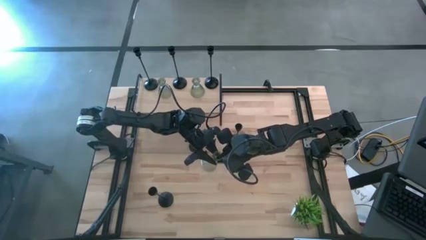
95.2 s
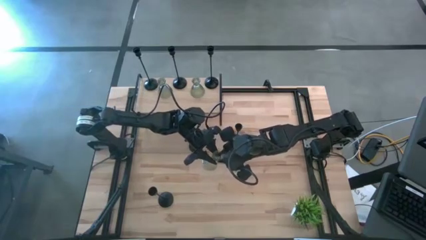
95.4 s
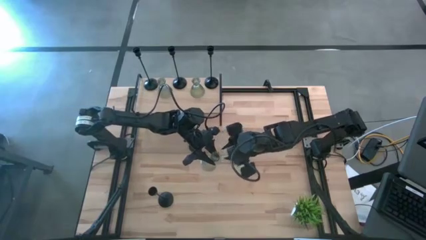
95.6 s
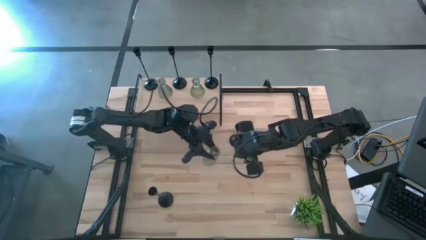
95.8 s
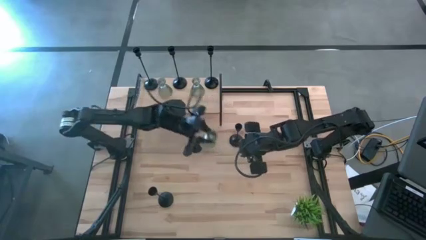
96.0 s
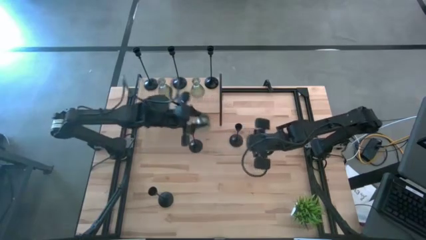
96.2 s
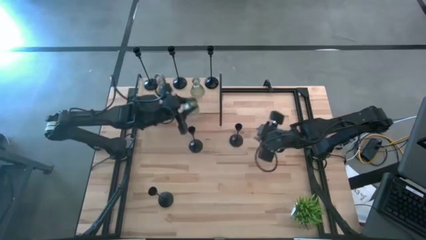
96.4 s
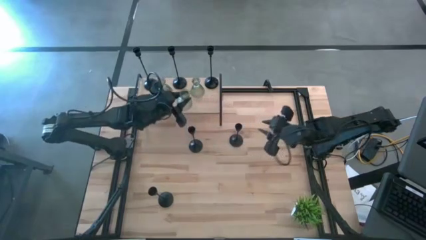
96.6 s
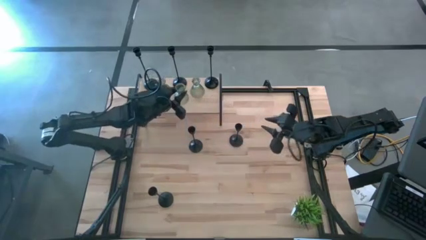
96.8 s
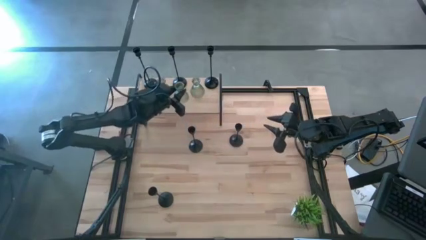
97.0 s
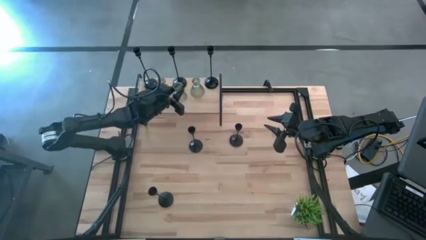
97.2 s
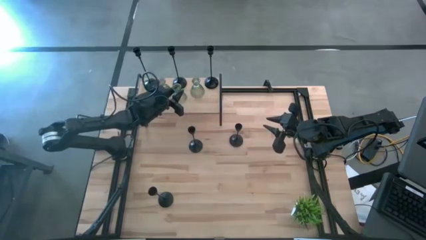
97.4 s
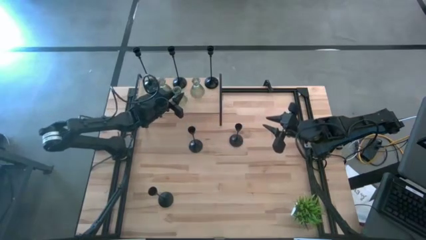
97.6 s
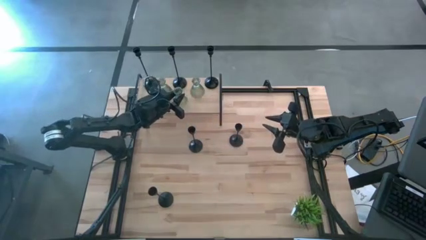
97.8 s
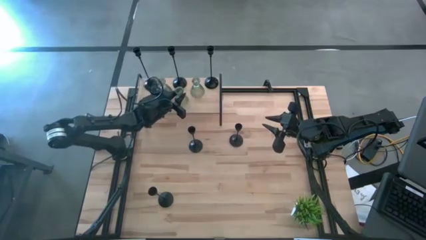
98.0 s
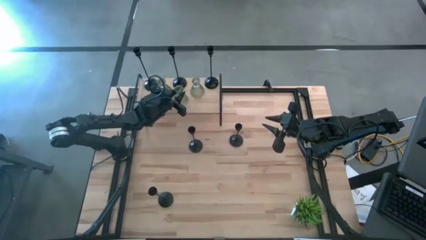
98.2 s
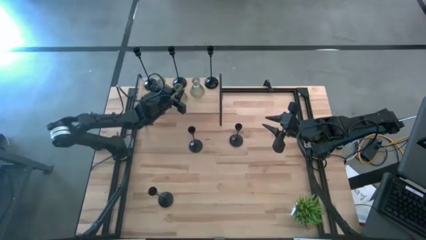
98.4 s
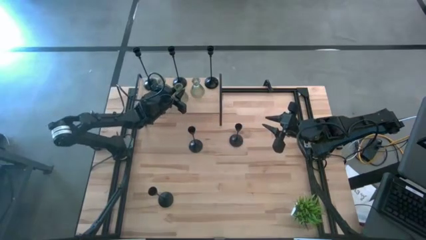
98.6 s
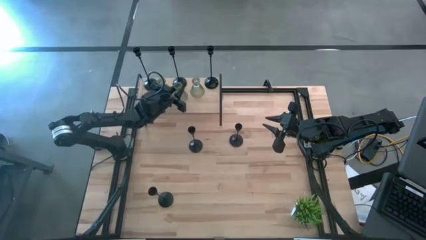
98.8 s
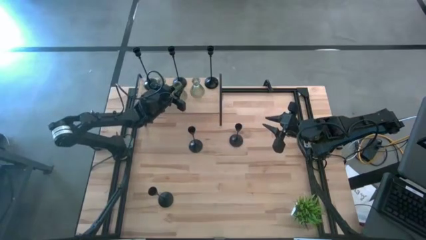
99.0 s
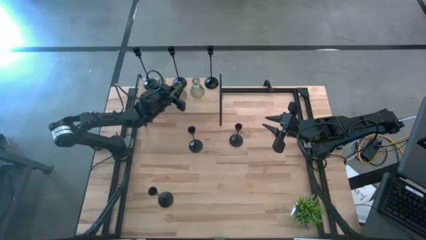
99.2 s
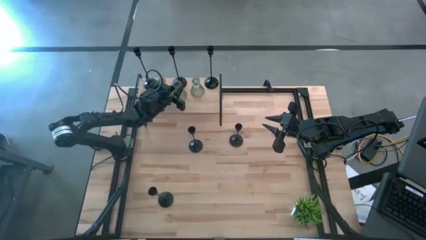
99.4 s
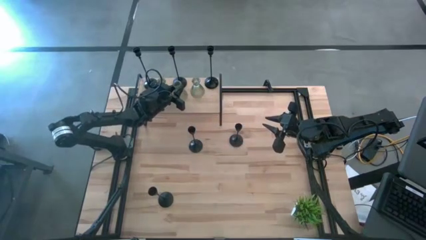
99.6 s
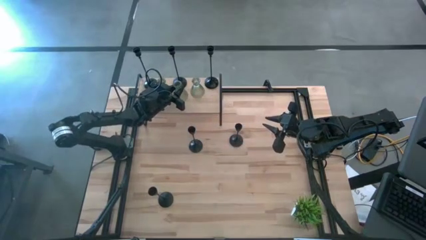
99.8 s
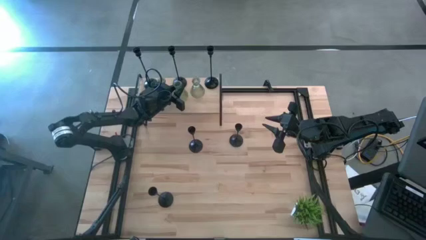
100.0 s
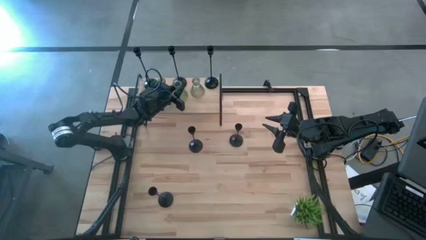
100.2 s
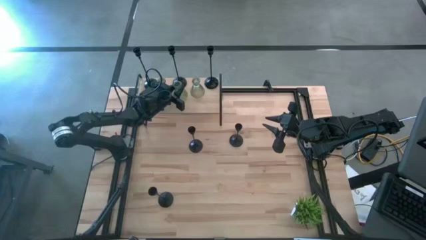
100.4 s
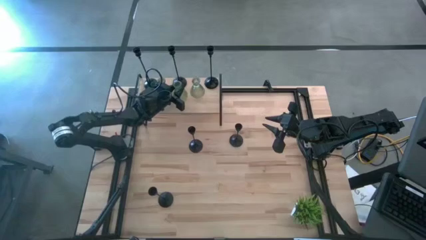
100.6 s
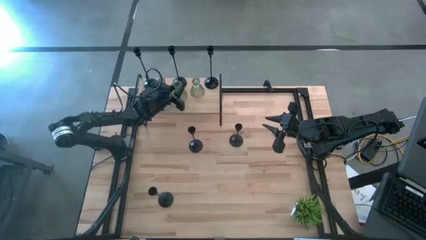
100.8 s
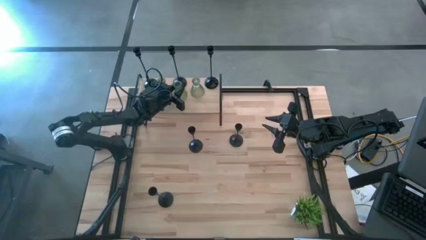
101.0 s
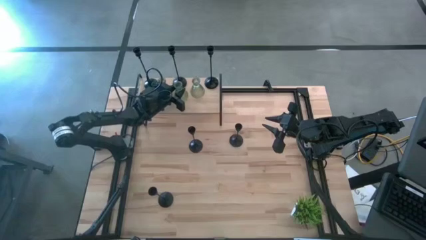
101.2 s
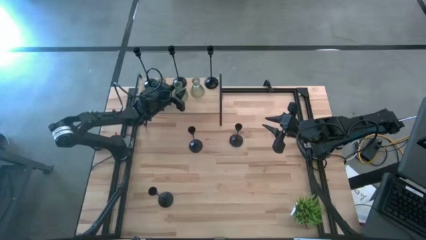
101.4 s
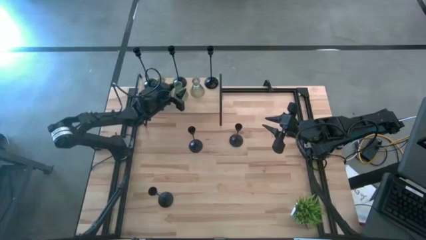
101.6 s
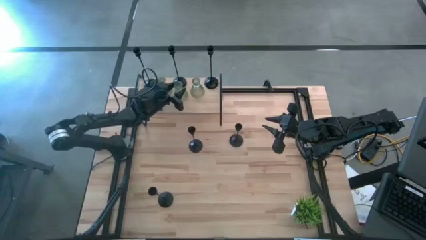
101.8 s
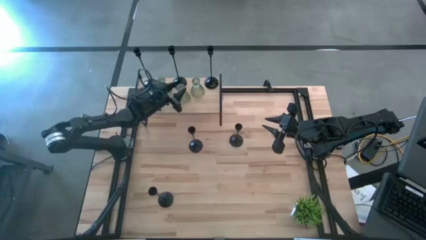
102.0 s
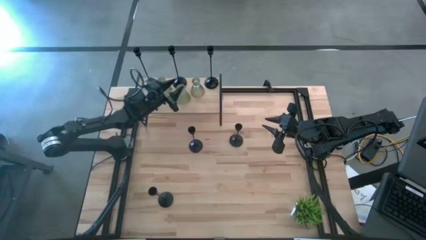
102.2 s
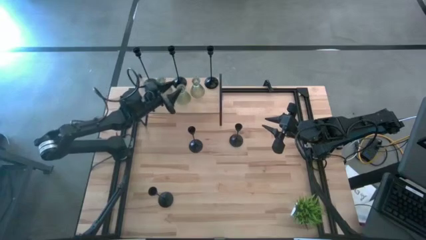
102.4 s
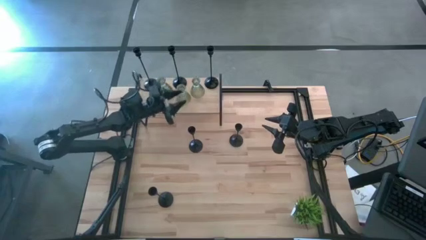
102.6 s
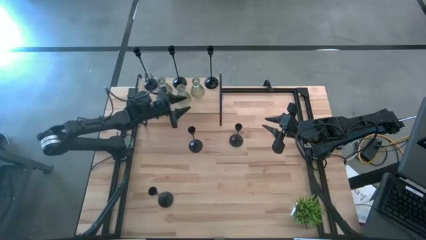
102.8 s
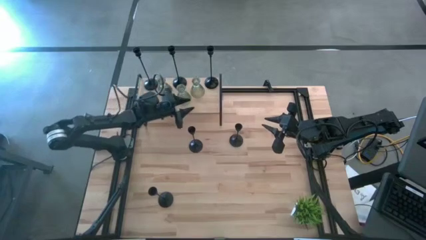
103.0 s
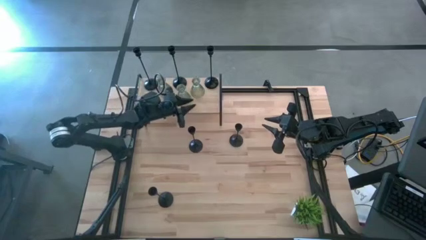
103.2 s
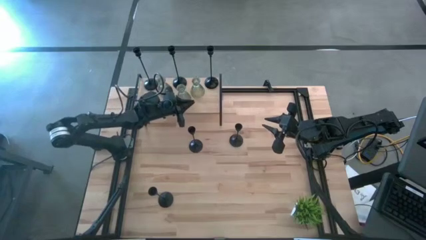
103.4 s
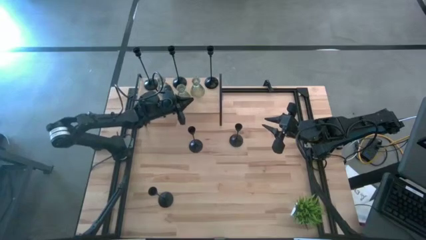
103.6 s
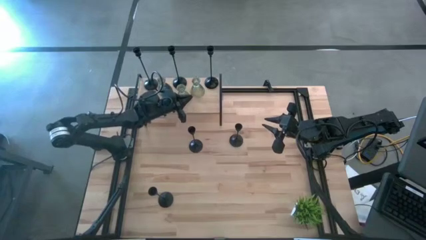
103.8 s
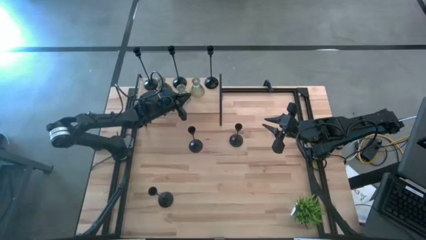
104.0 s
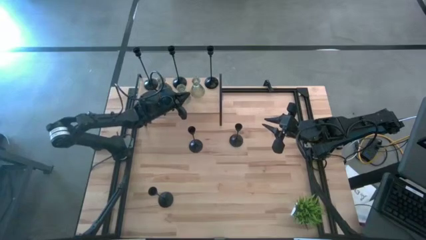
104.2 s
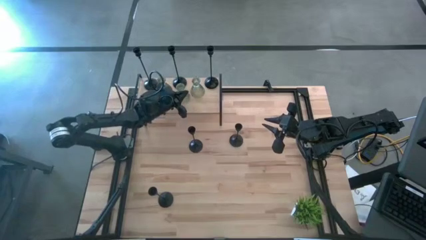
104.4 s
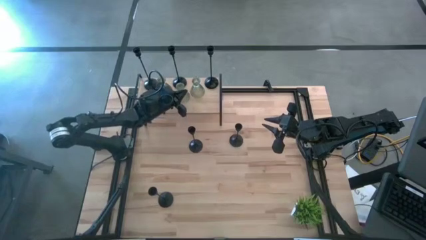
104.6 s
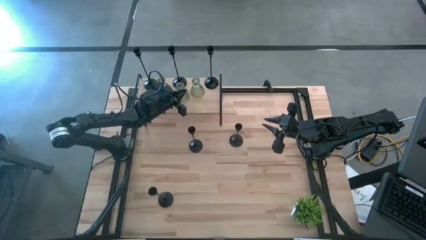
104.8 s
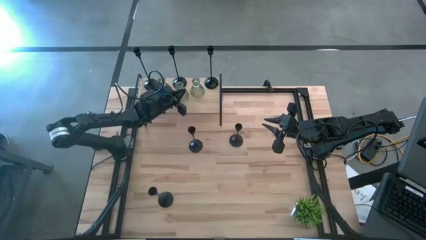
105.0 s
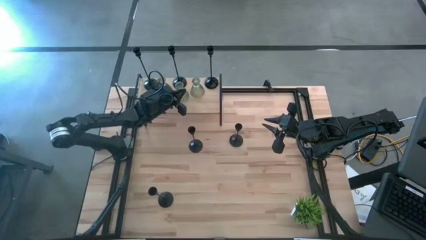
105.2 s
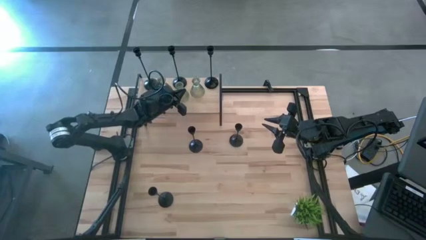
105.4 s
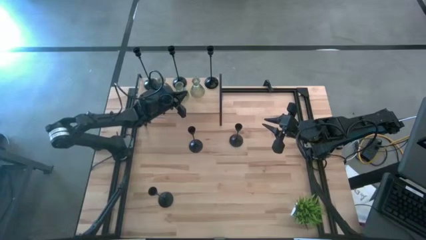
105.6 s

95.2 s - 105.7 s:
Task: Pick & Place candle stick holders
Put the green glass candle holder on the shelf

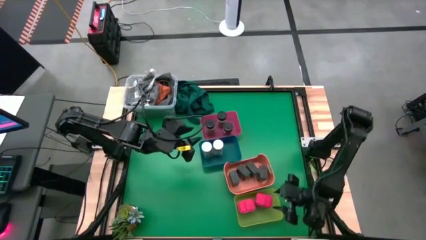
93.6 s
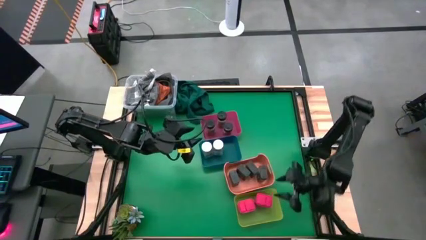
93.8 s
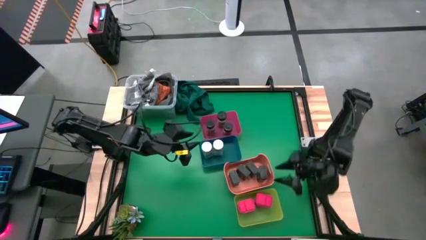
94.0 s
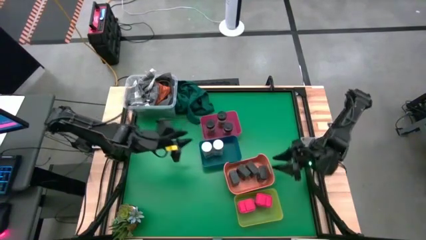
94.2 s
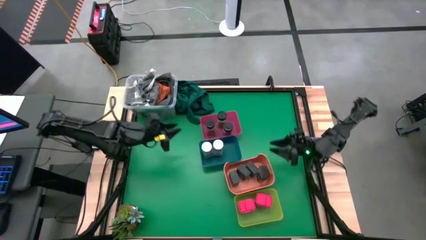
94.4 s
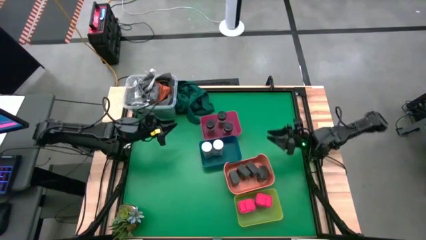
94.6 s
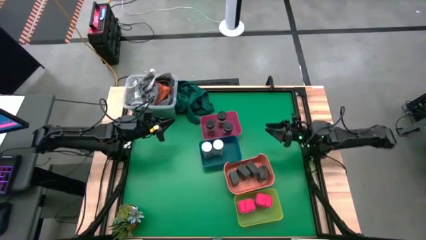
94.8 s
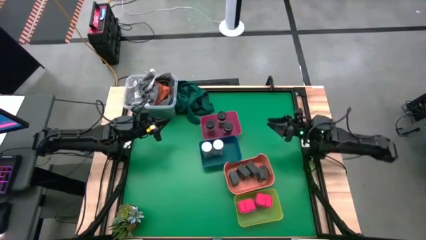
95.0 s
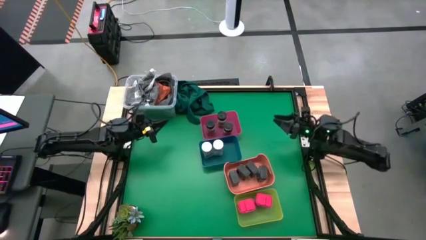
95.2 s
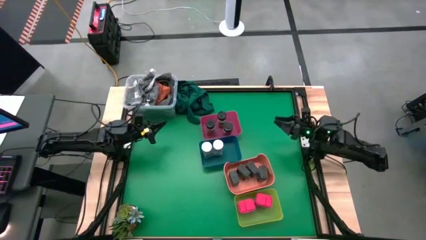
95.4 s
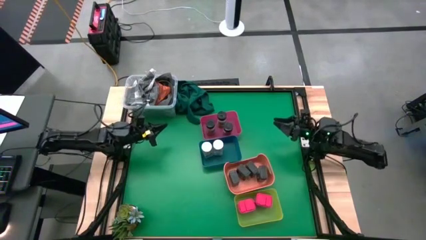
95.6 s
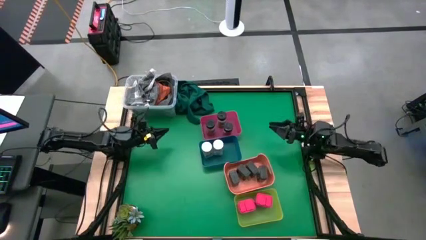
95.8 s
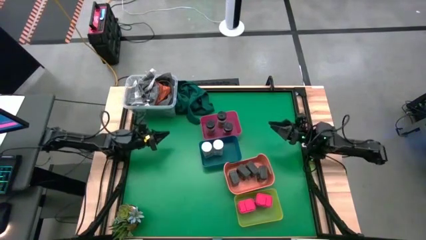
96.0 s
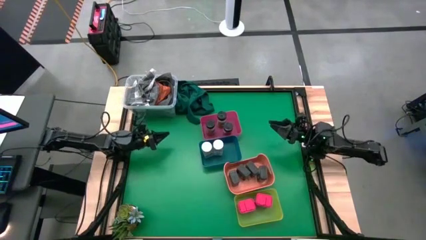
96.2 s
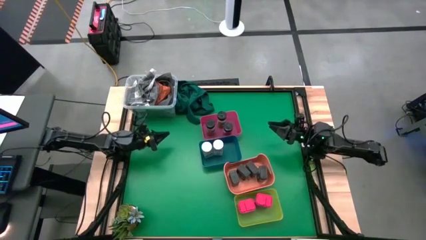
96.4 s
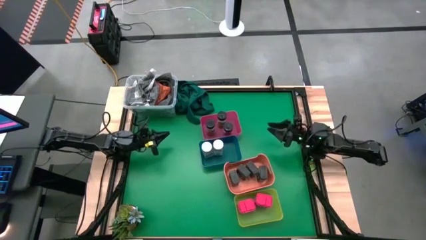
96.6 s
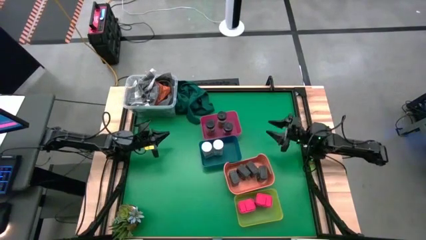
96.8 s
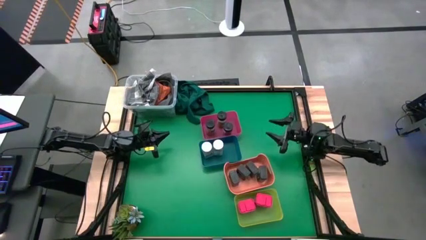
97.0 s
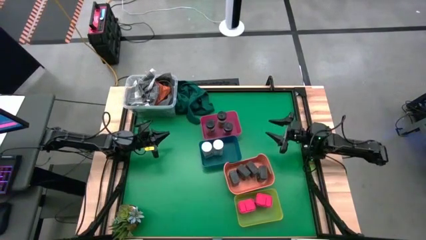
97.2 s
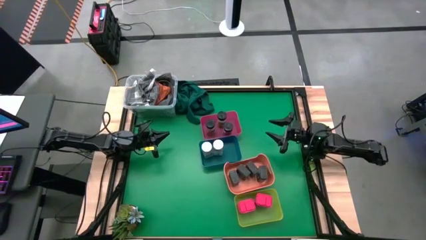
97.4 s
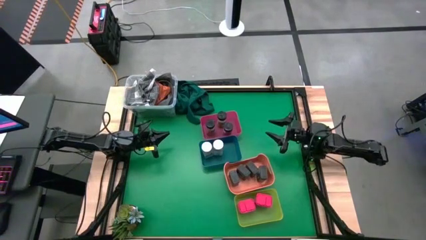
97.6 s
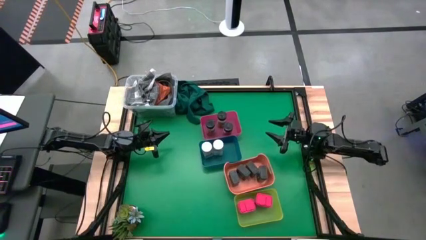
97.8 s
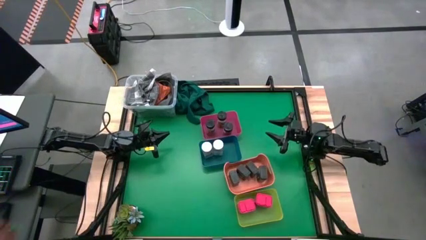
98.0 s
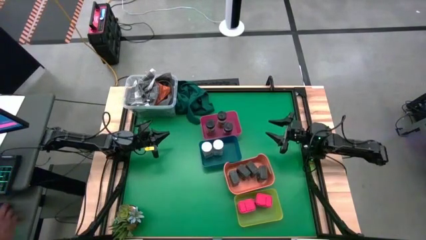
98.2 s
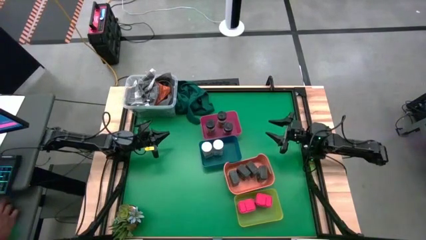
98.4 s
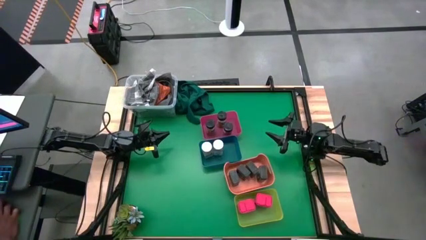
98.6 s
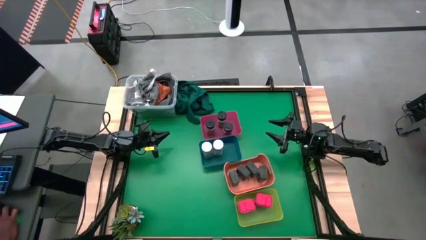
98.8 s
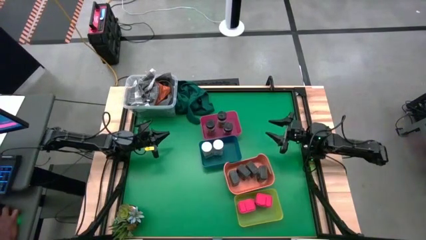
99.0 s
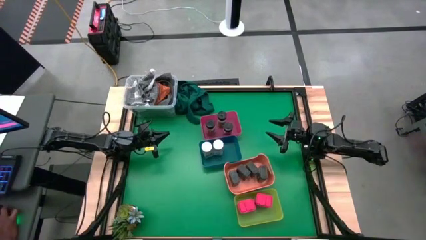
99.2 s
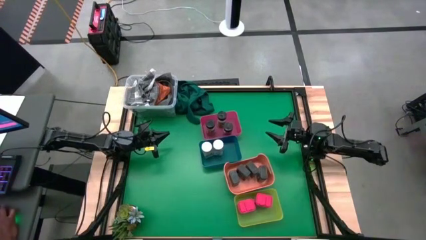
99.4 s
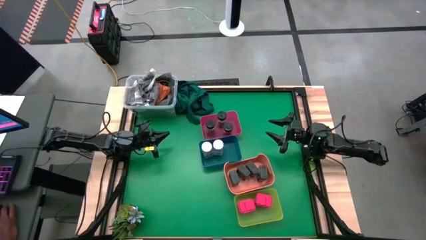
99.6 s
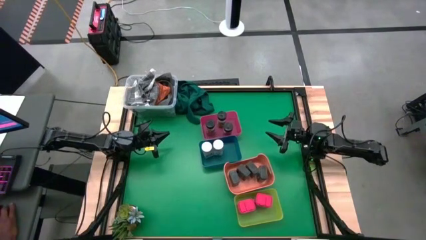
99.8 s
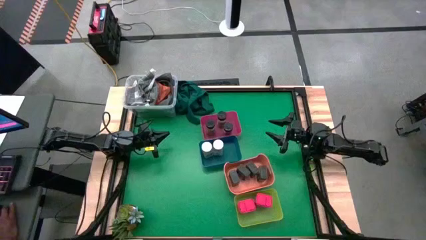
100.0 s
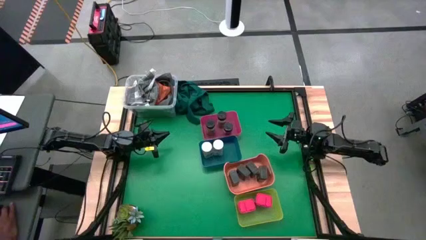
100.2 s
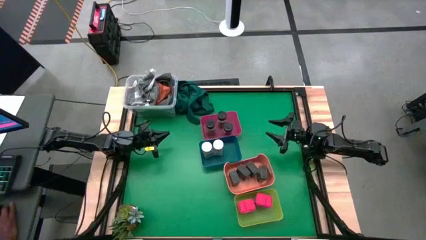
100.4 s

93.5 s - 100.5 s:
Task: Sort spices by type
Return to Home Position
